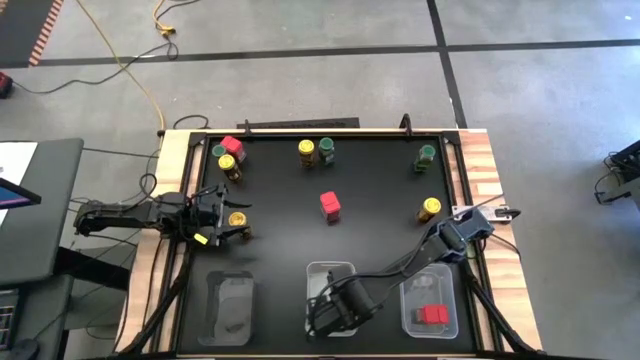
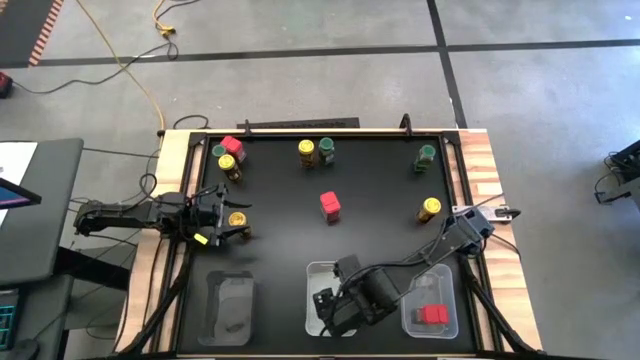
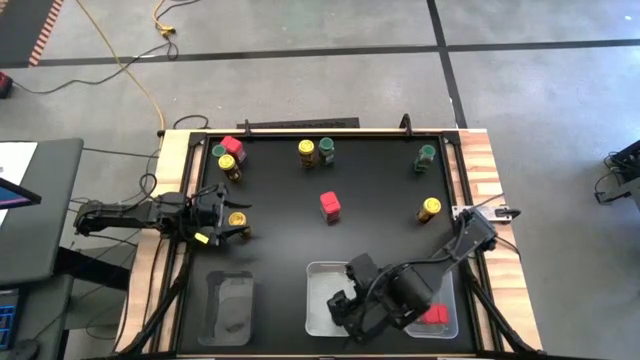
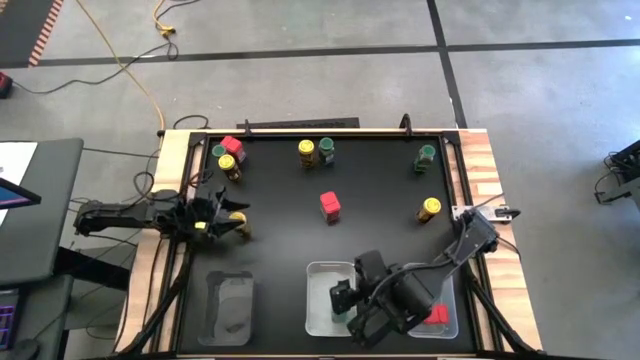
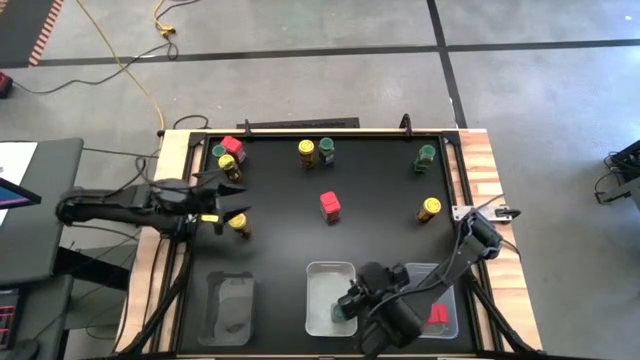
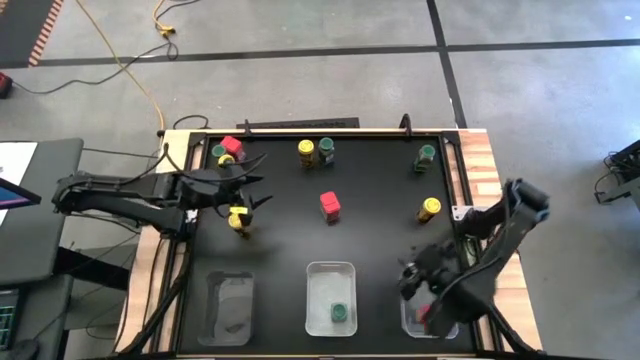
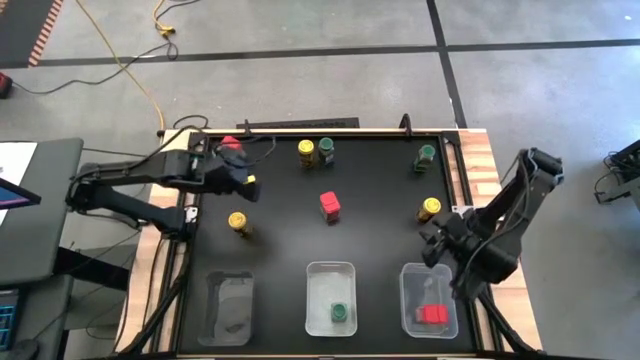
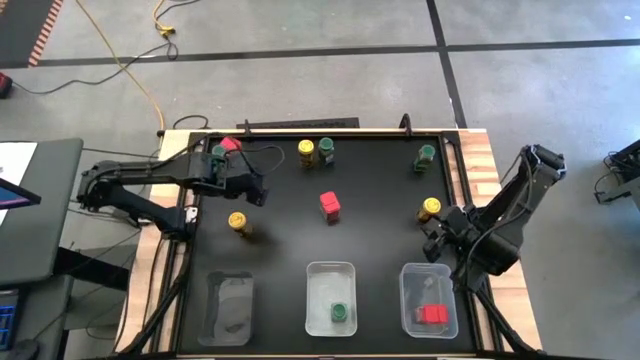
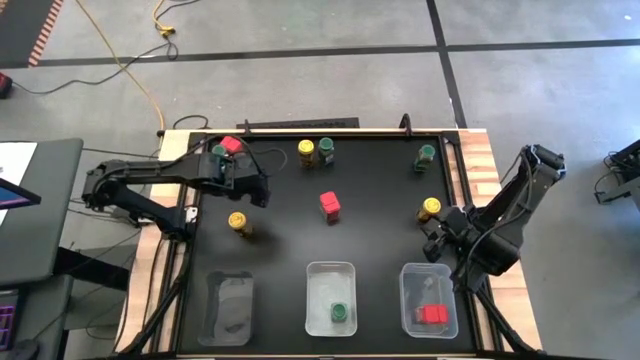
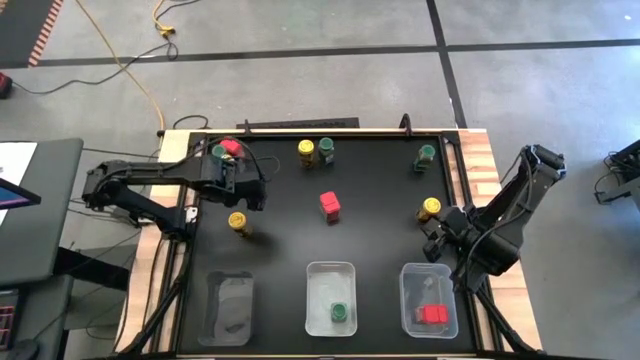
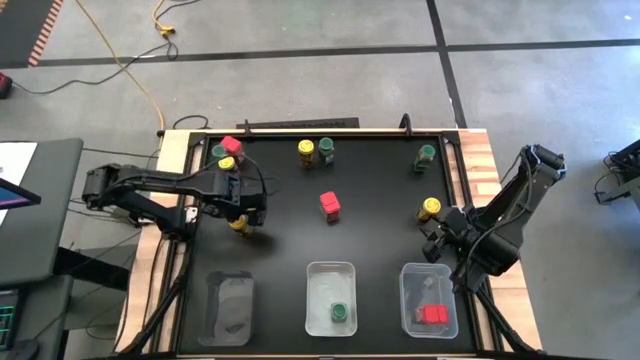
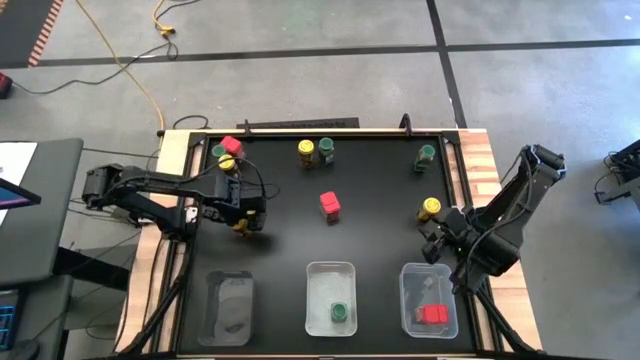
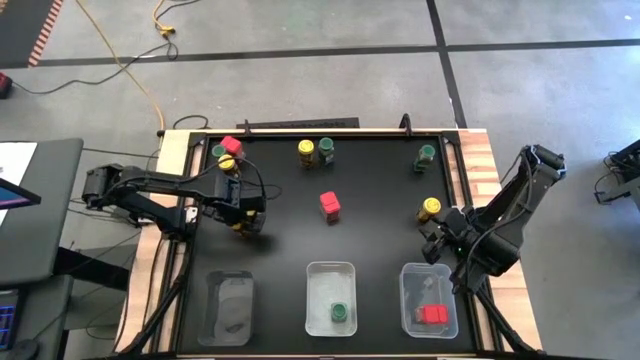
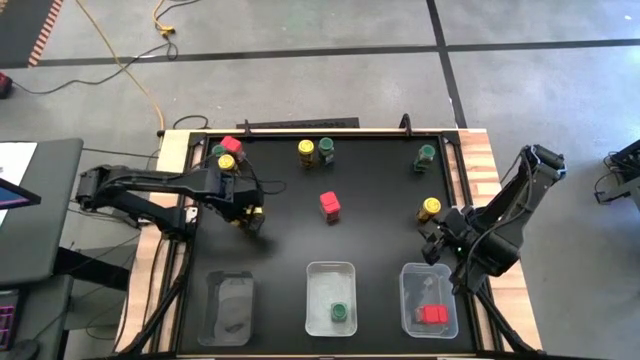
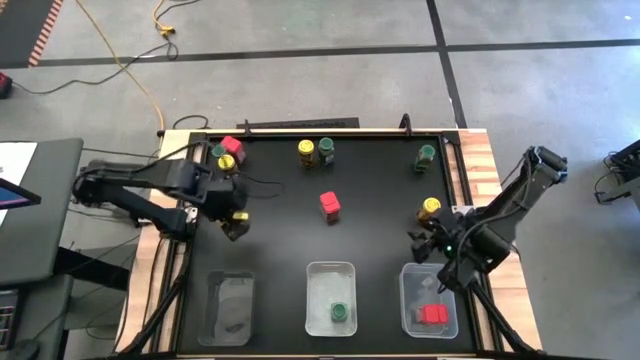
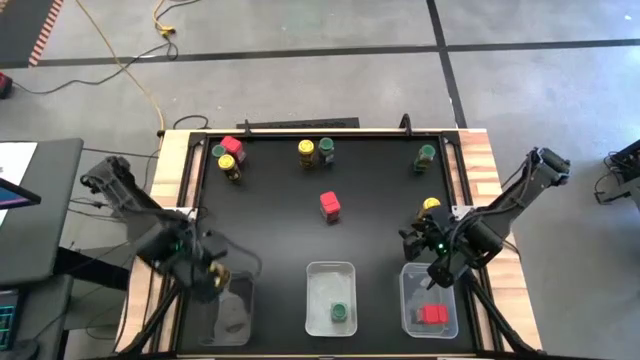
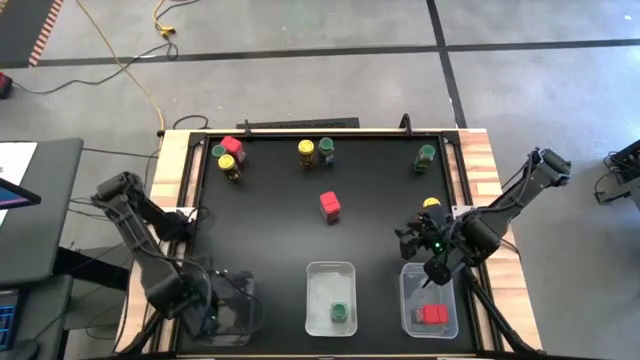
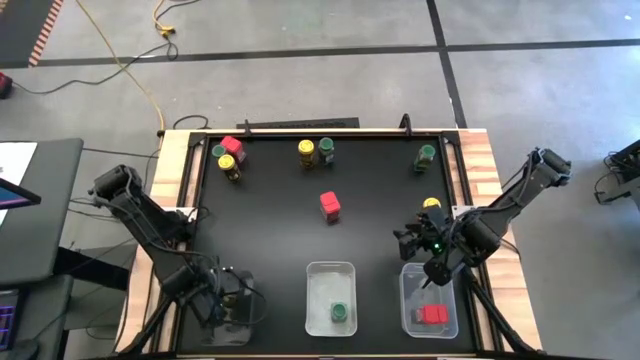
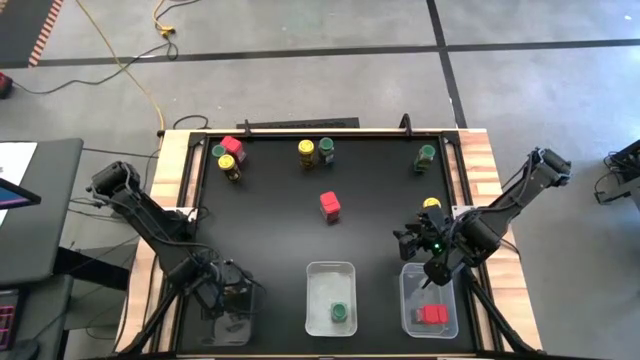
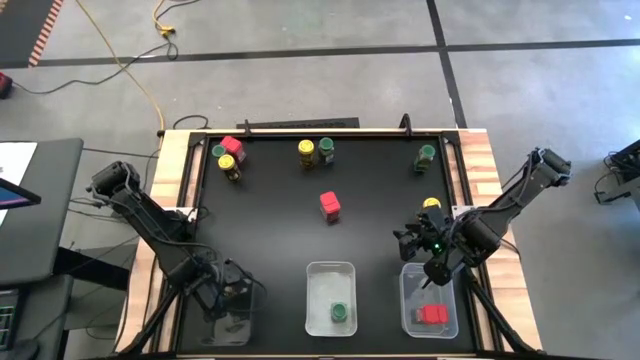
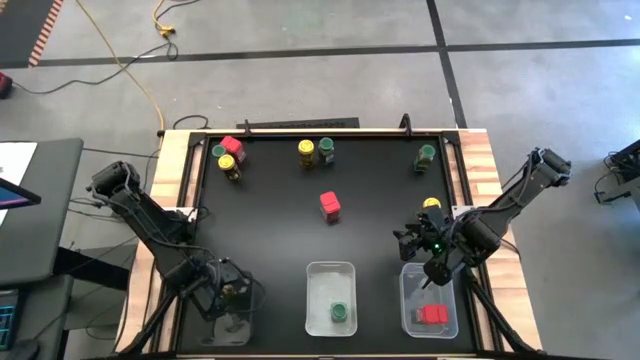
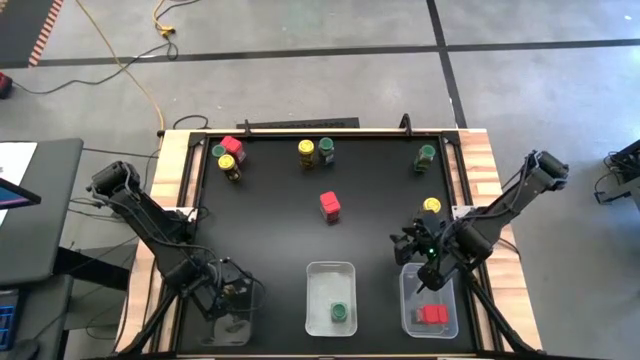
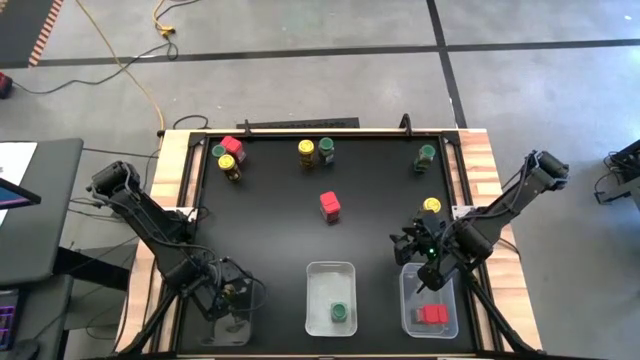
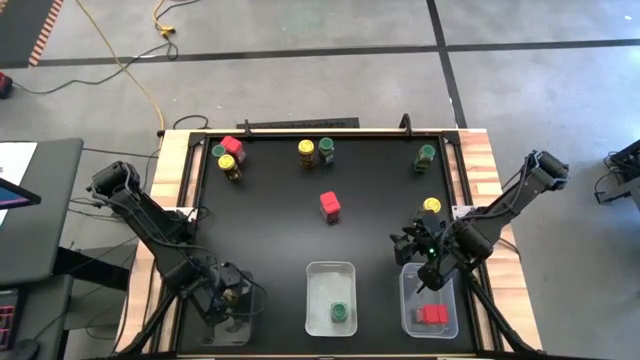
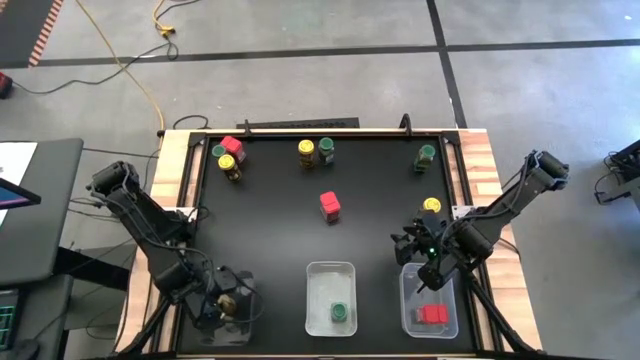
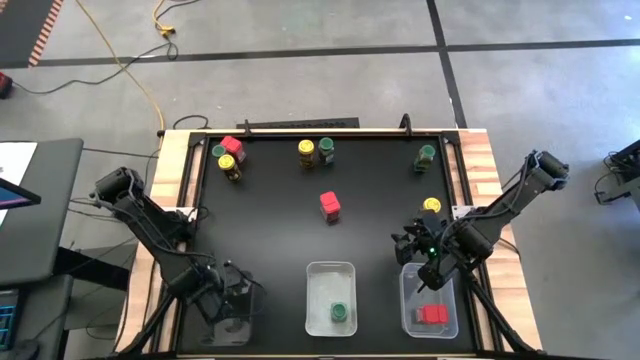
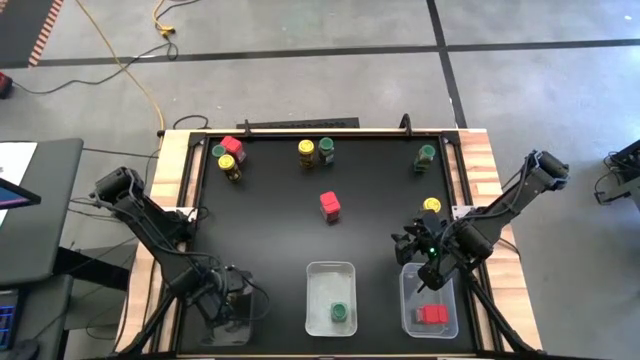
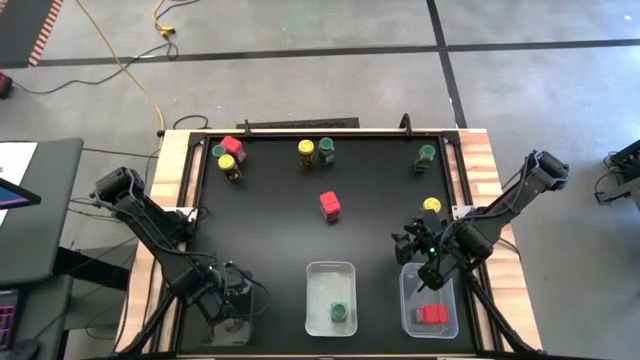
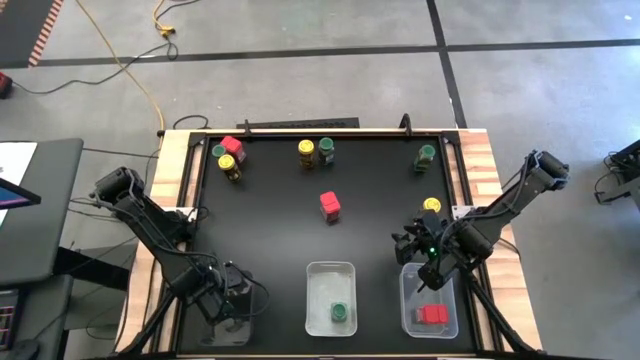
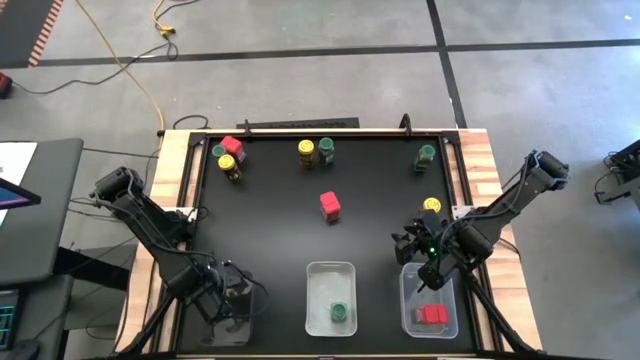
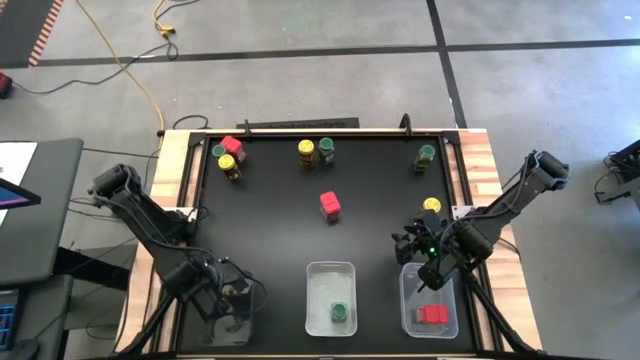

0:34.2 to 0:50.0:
Task: Sort spices by type
Put the bottom left yellow seasoning bottle into the black bin

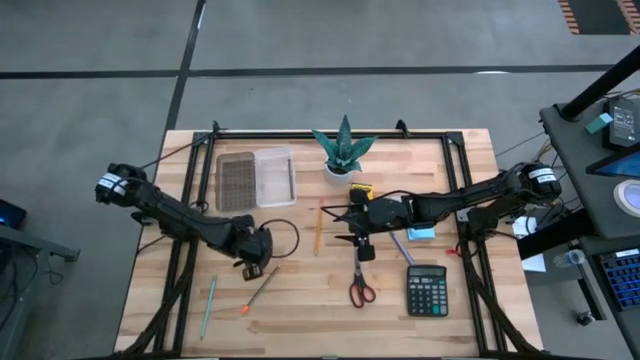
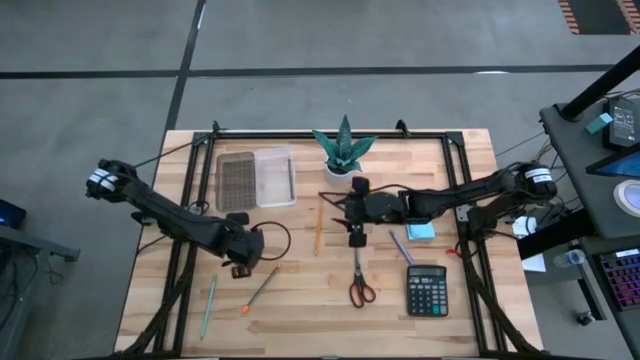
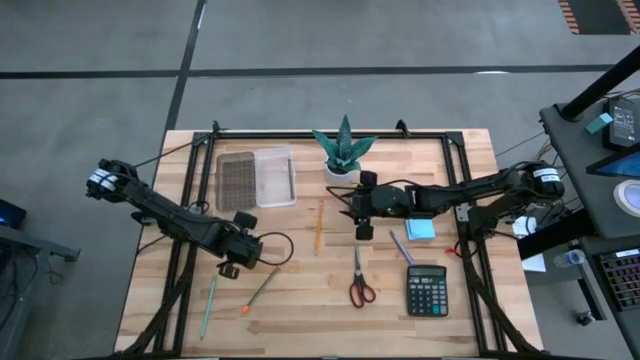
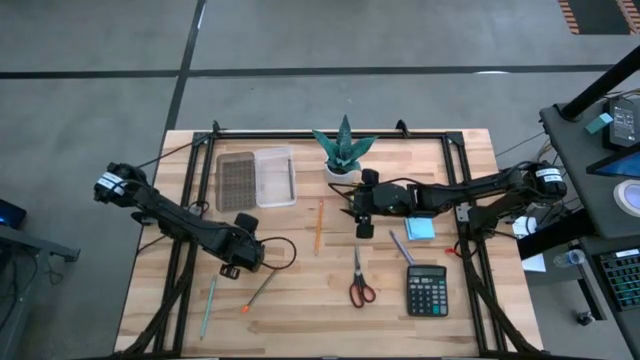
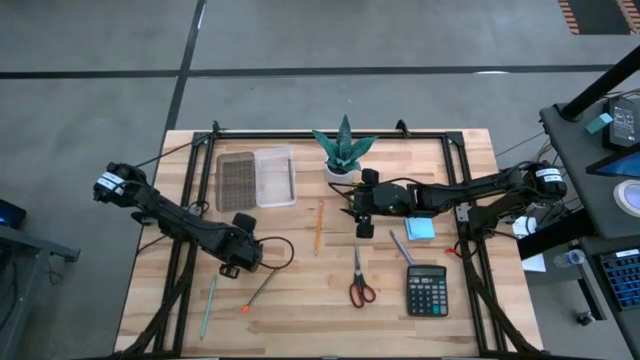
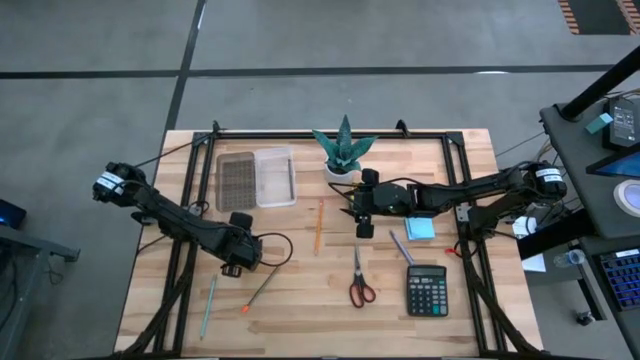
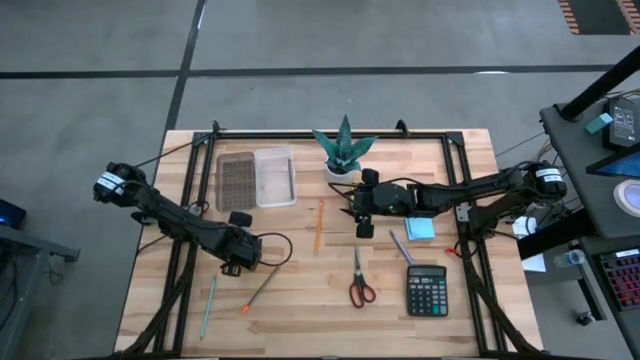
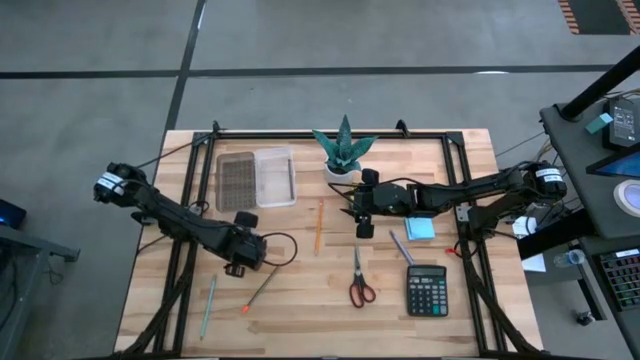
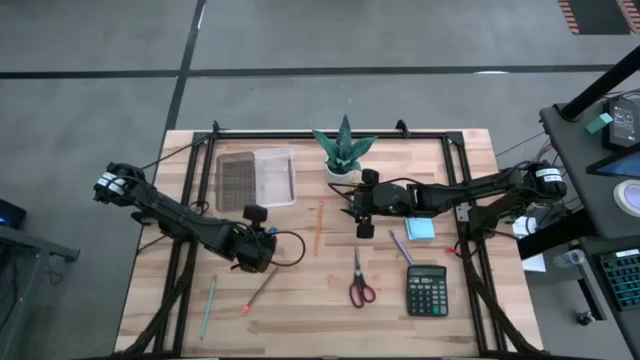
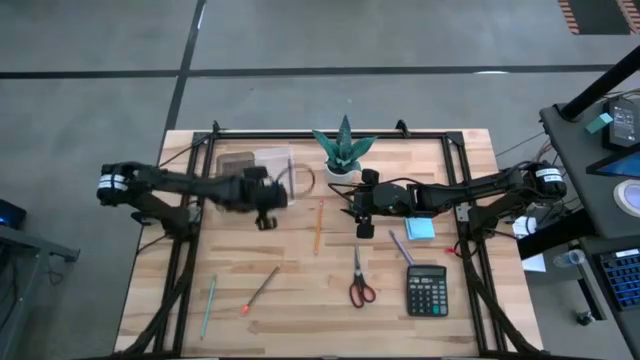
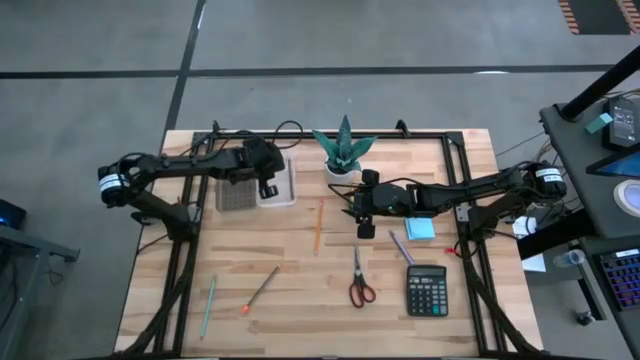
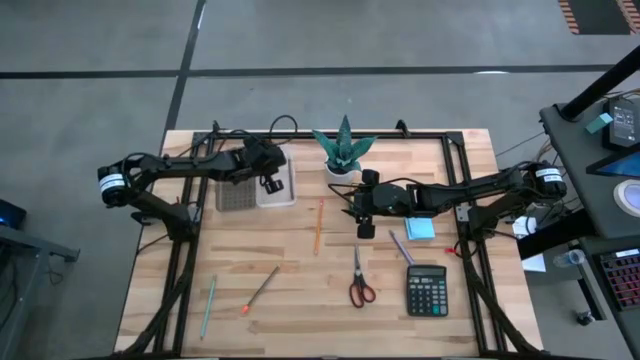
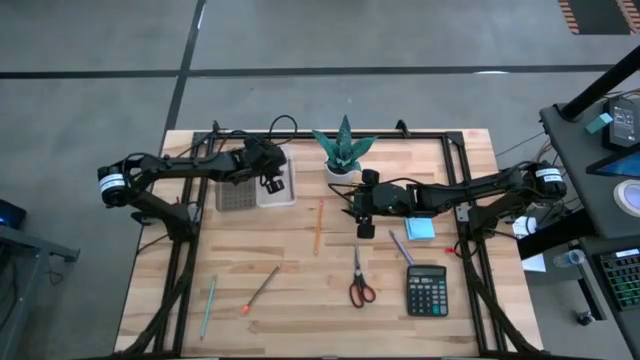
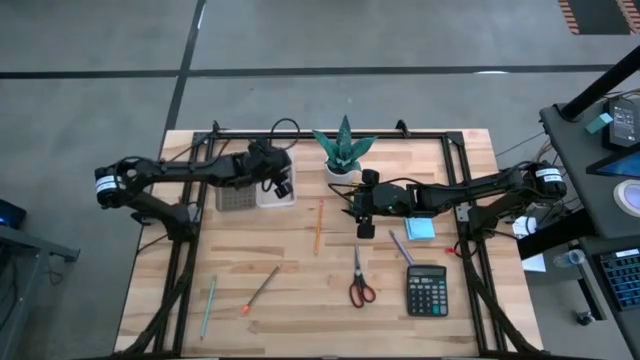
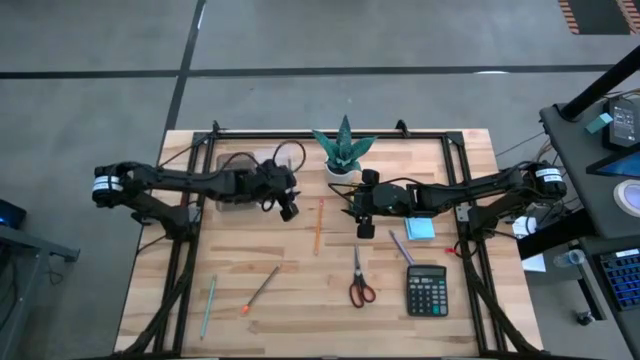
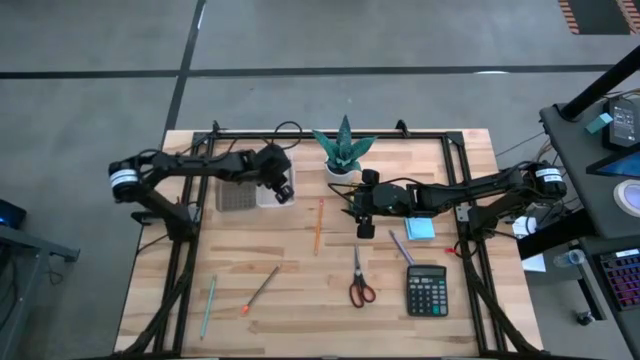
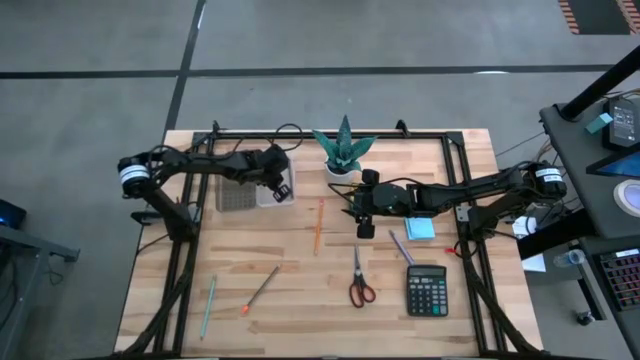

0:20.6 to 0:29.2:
Task: Pack school essentials
Put the blue eraser into the black supply box
